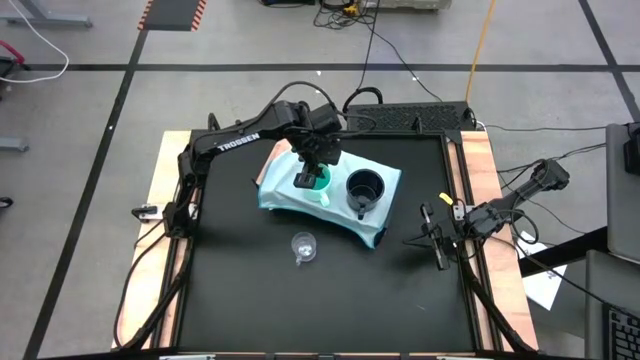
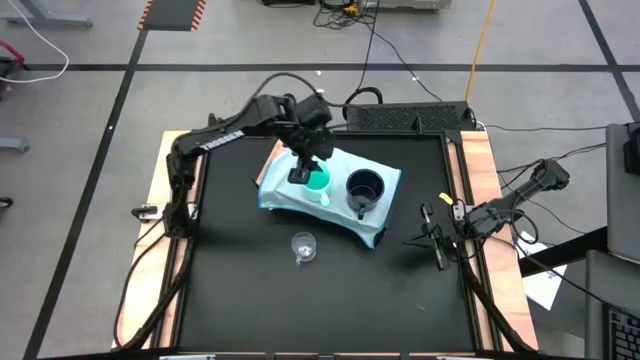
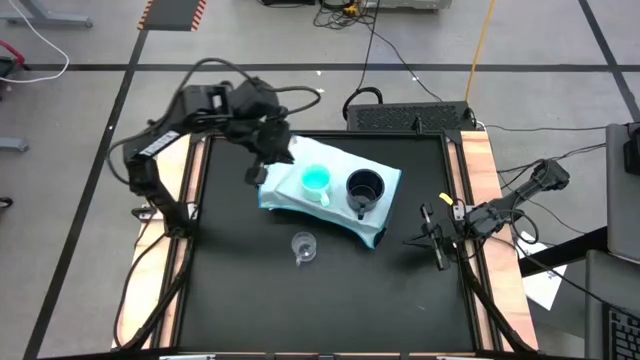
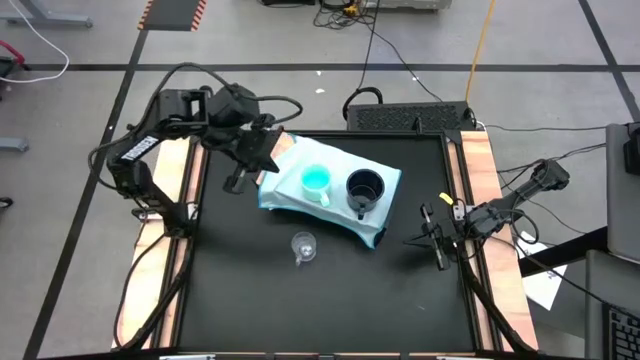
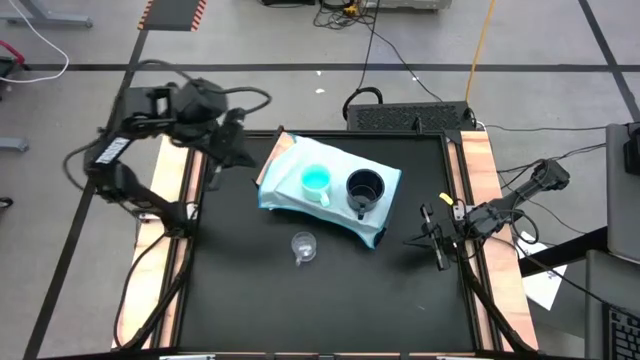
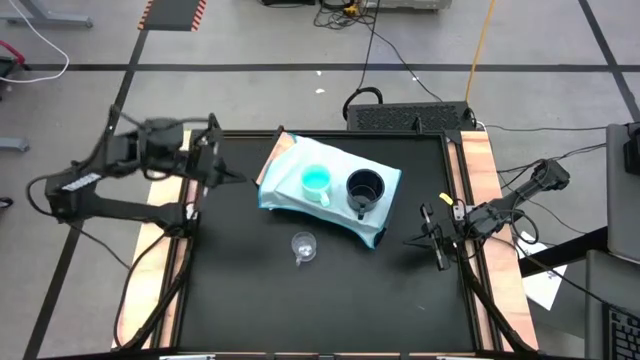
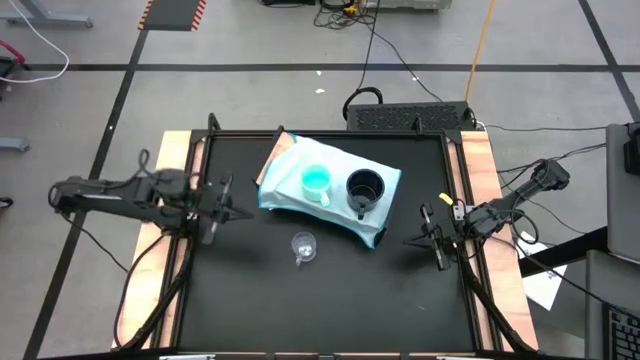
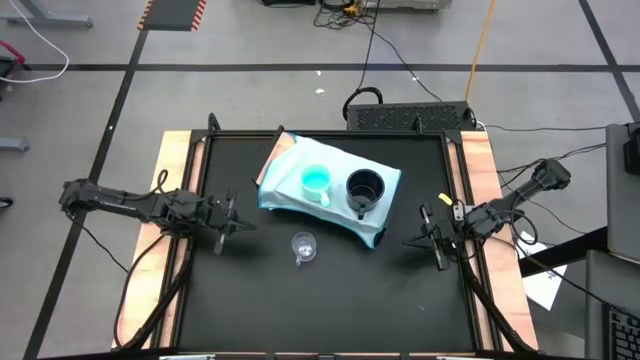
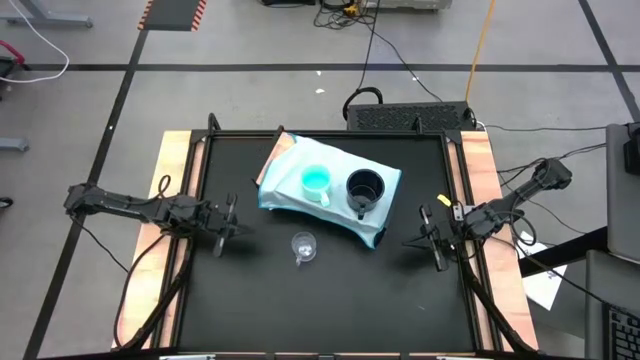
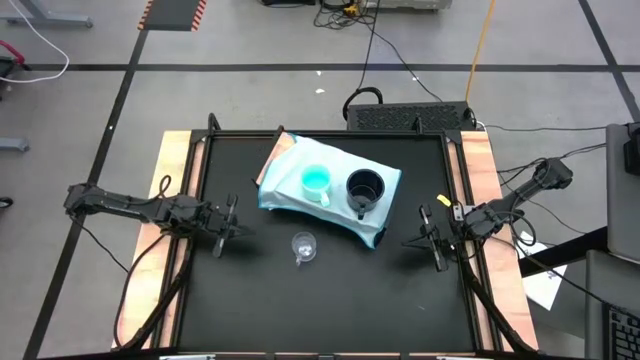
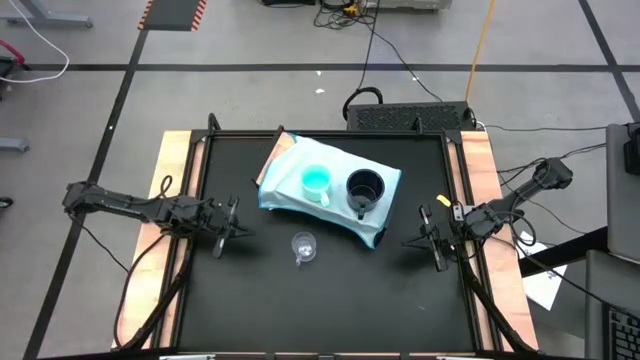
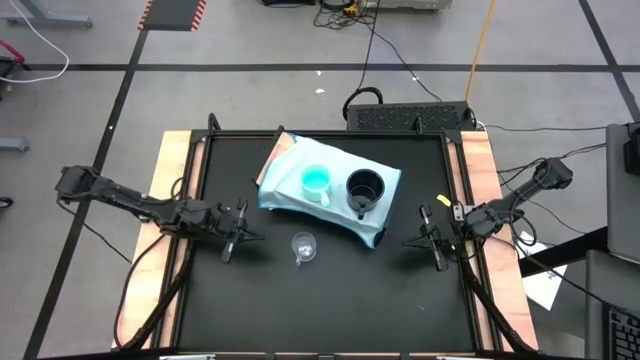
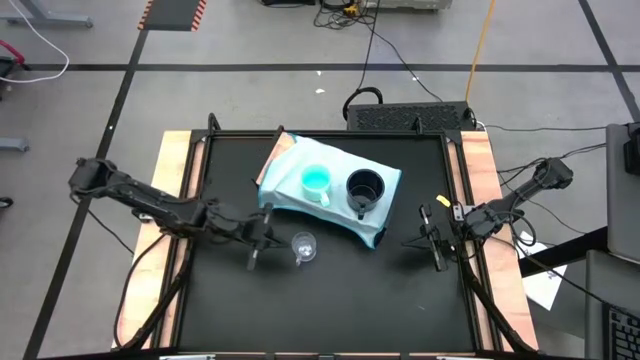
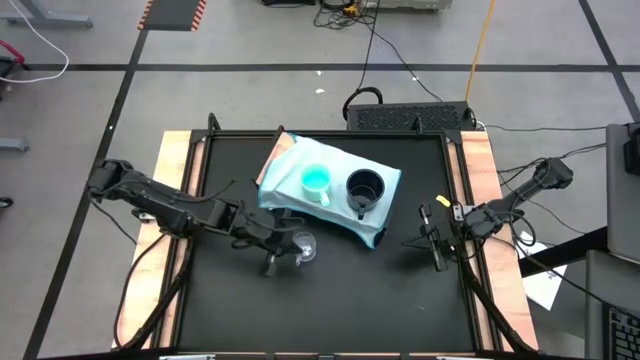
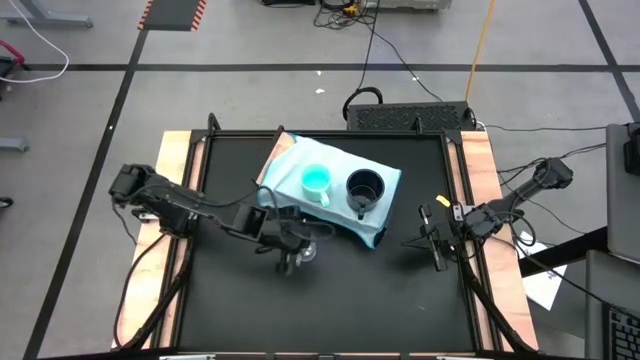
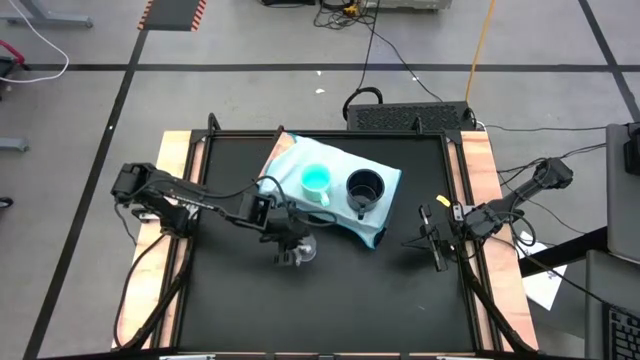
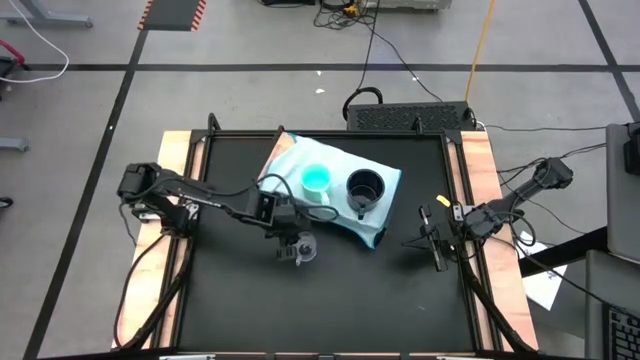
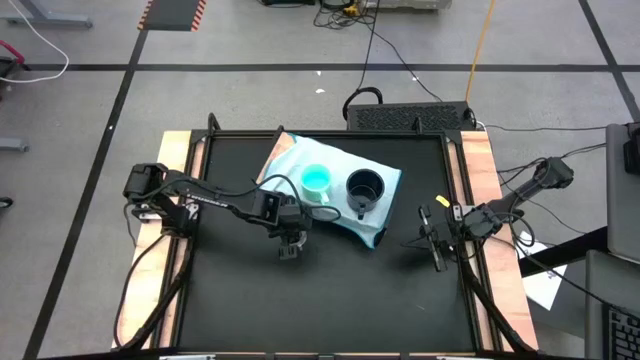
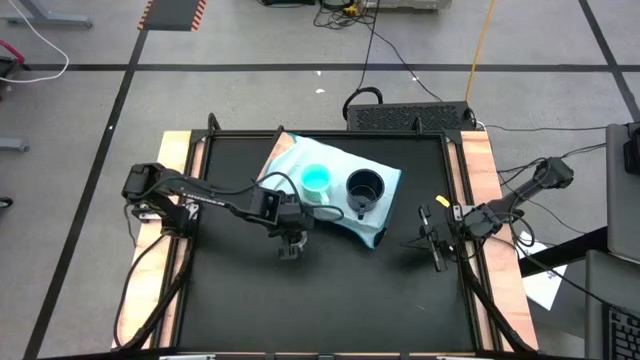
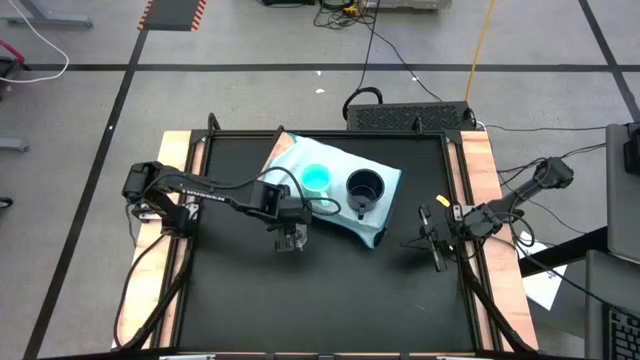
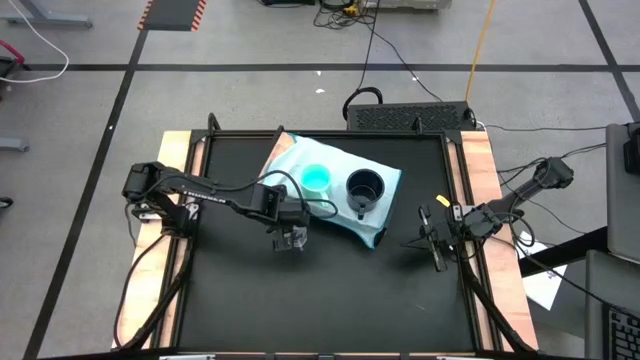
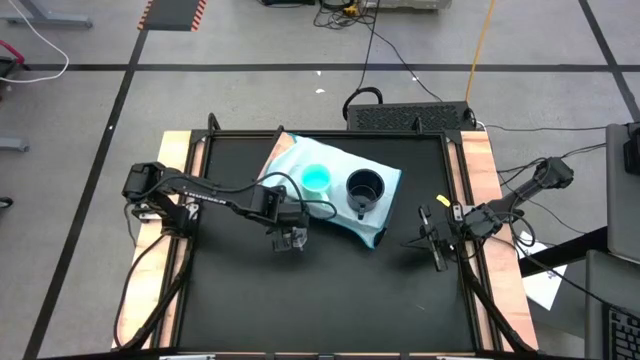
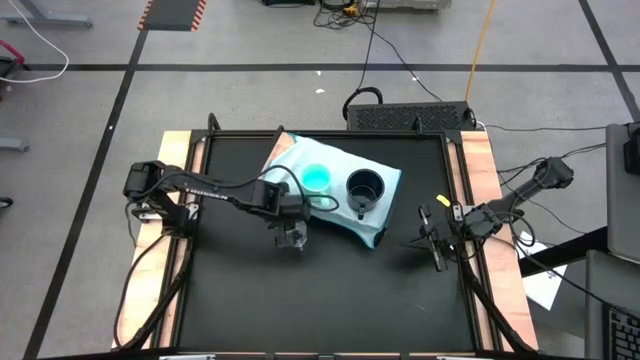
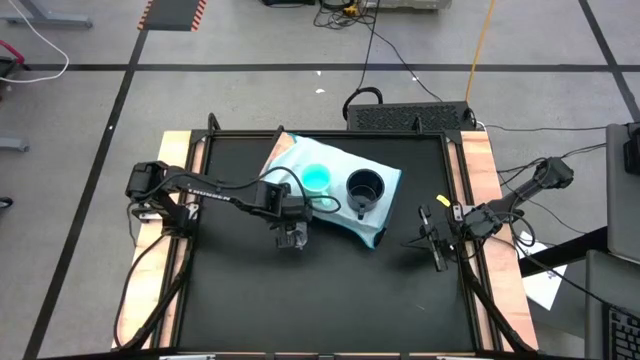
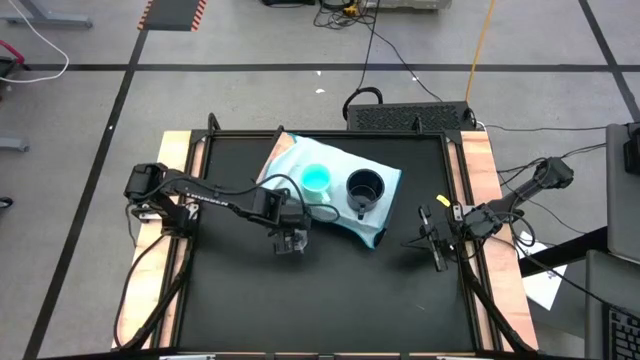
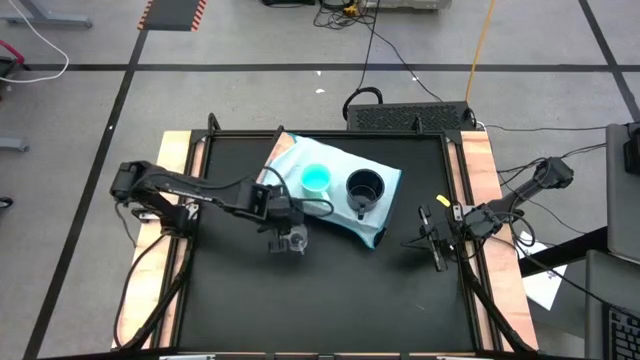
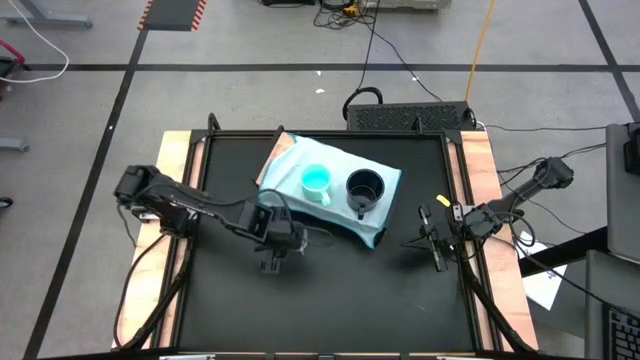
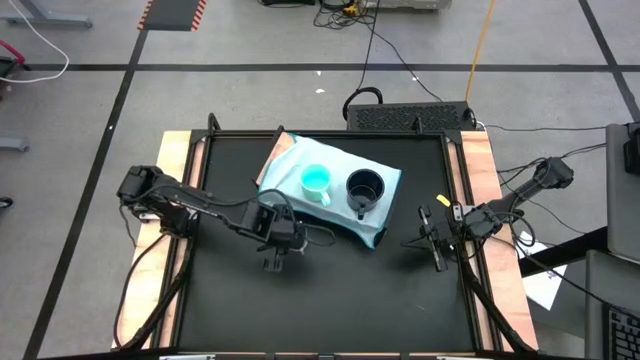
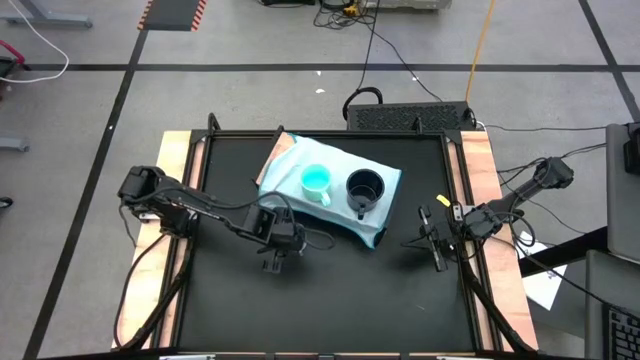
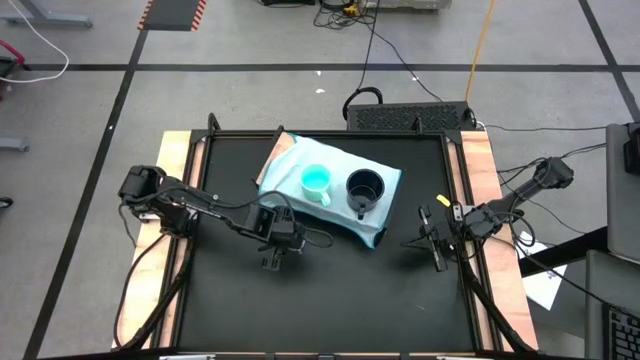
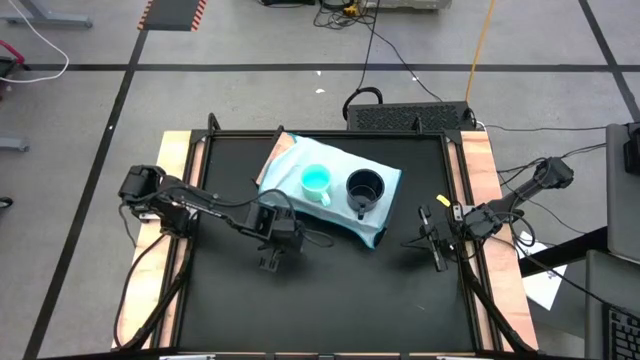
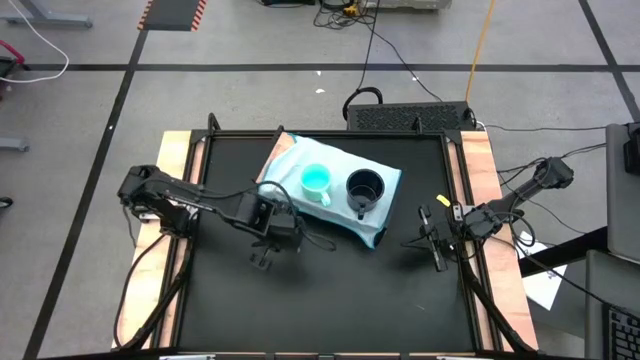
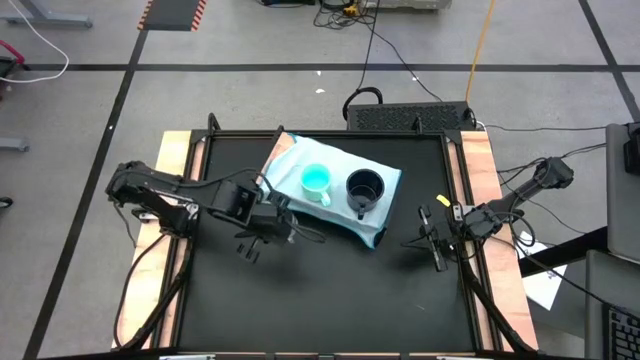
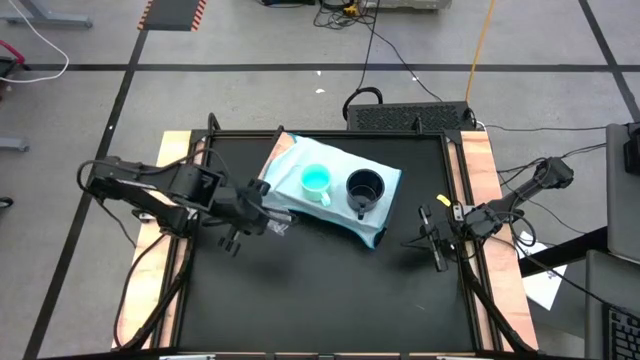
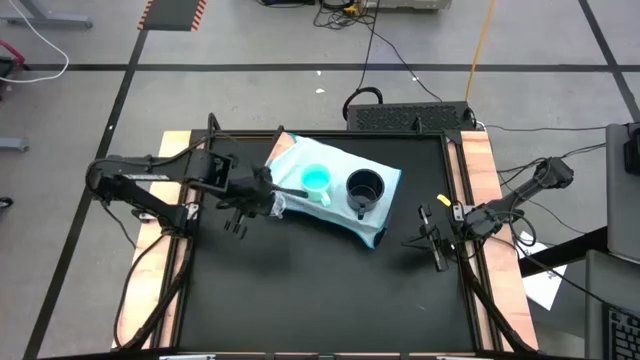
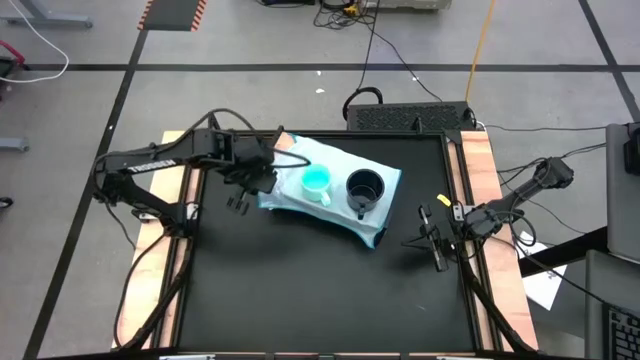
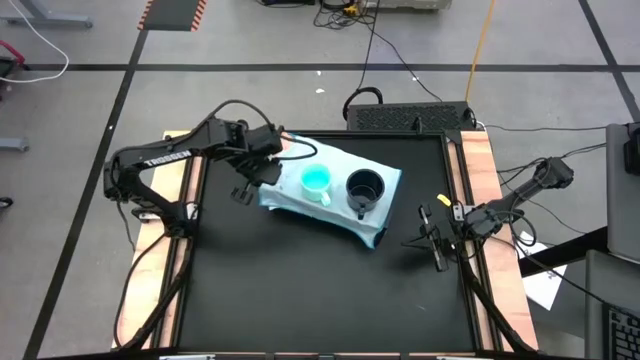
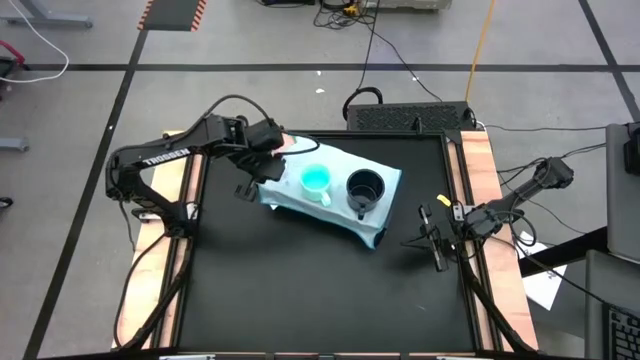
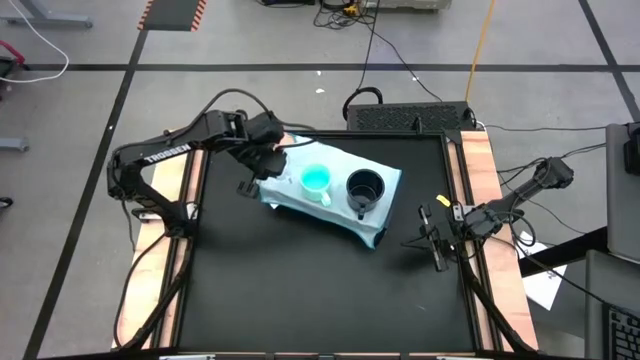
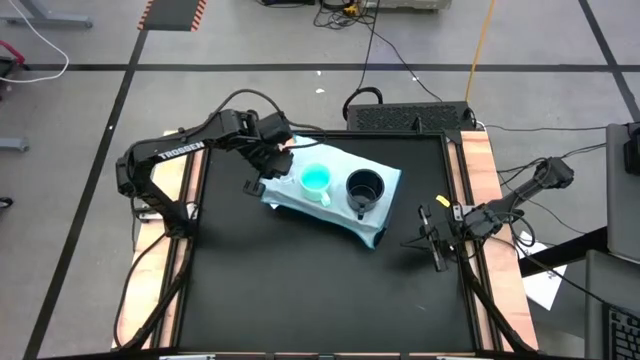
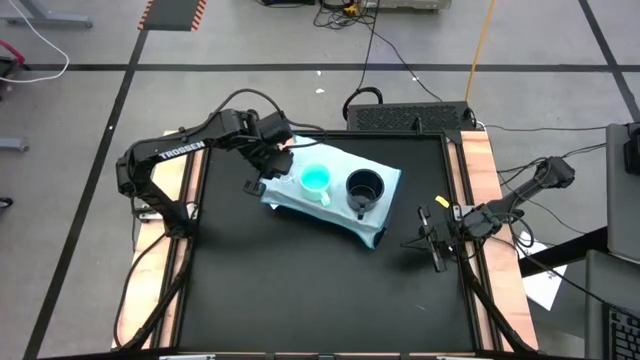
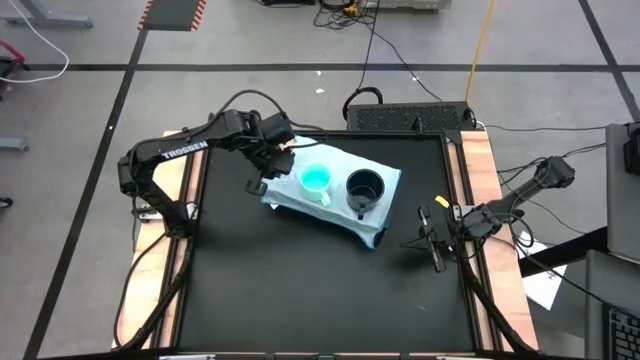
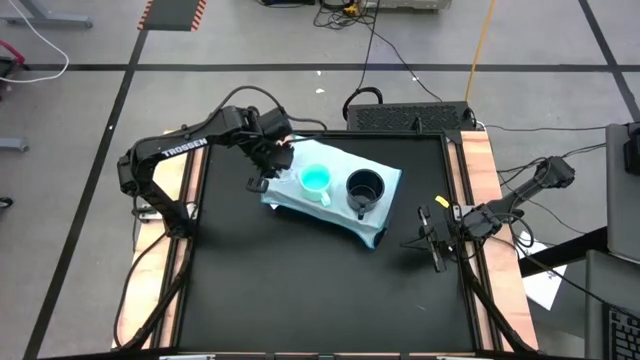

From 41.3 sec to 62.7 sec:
Task: Stack small to large cups/mugs on shelf
Put the transparent mug on the shelf
